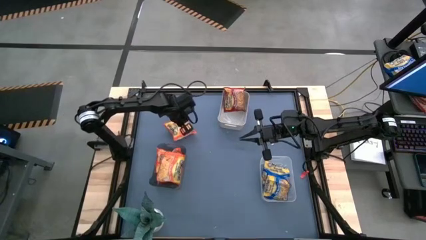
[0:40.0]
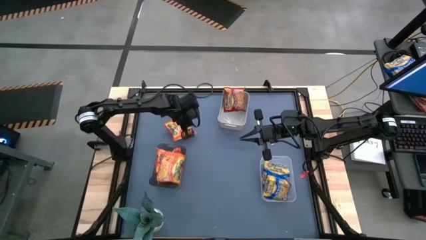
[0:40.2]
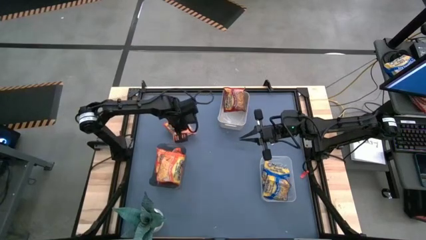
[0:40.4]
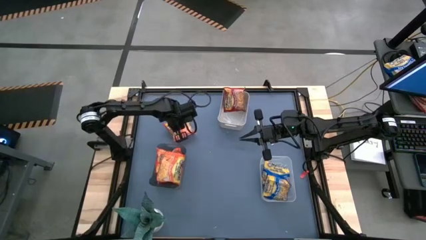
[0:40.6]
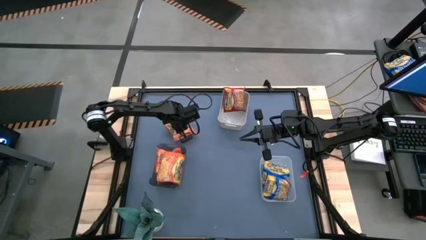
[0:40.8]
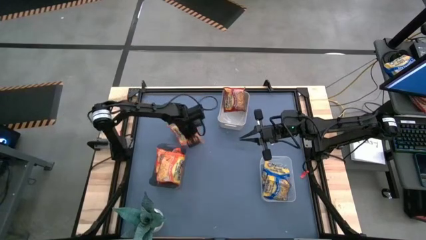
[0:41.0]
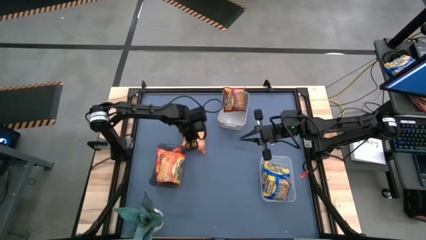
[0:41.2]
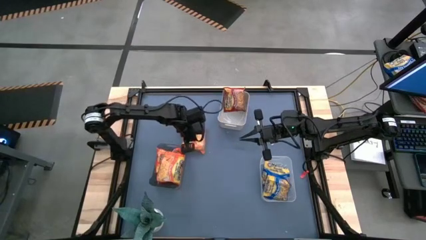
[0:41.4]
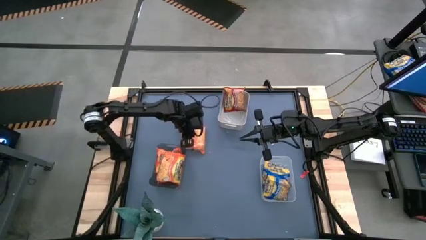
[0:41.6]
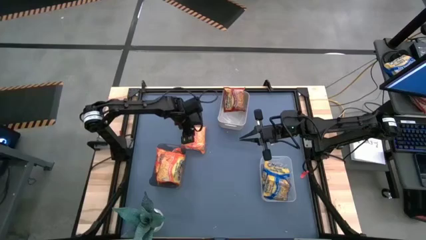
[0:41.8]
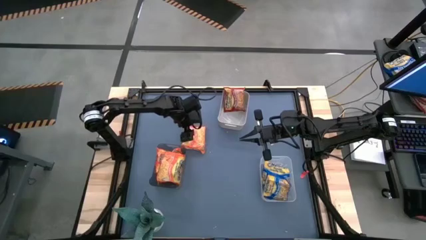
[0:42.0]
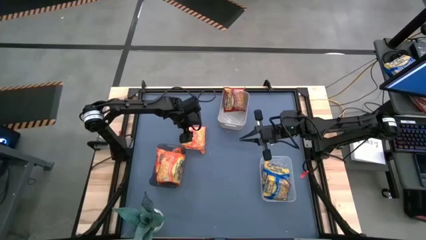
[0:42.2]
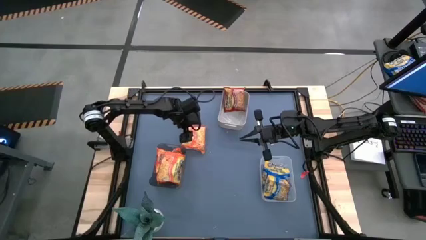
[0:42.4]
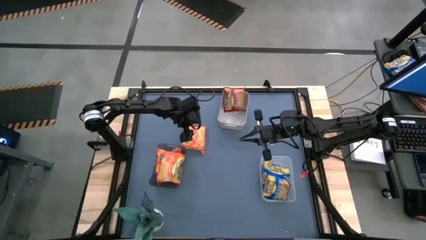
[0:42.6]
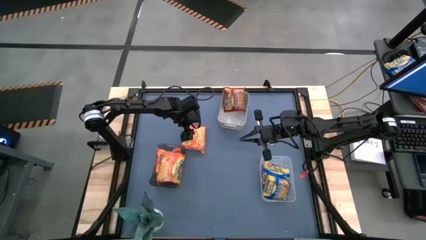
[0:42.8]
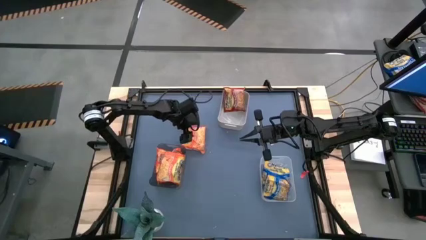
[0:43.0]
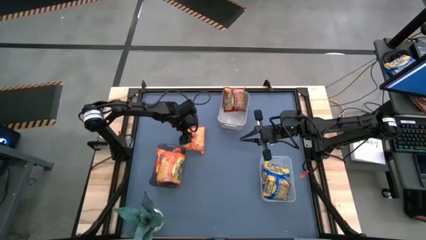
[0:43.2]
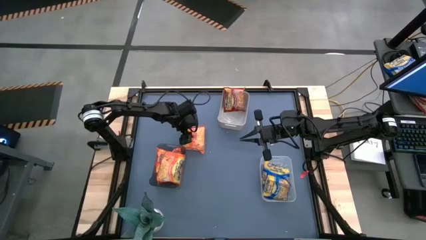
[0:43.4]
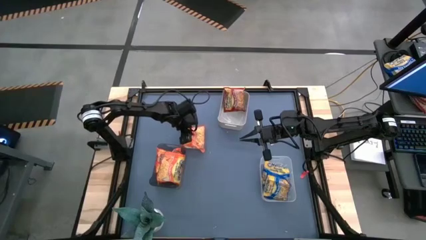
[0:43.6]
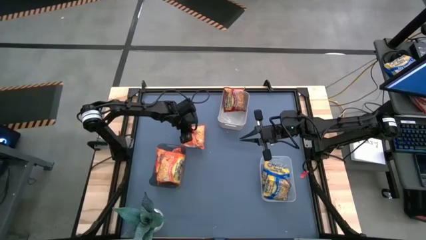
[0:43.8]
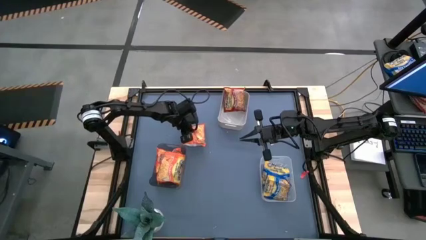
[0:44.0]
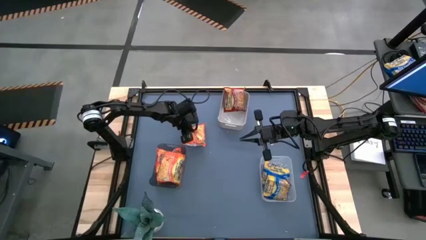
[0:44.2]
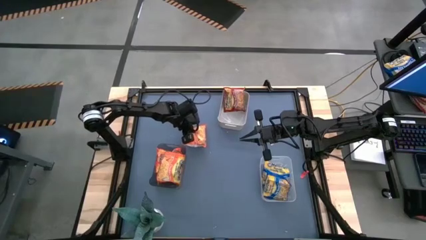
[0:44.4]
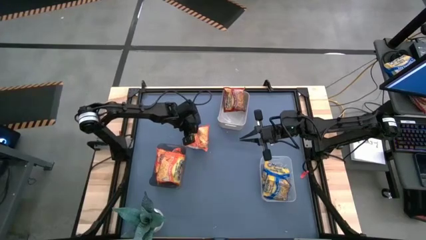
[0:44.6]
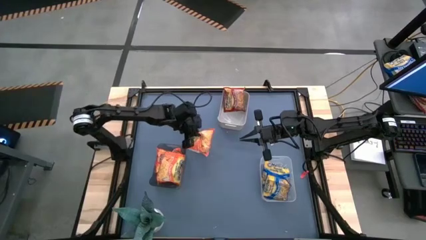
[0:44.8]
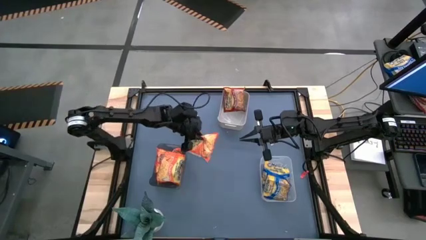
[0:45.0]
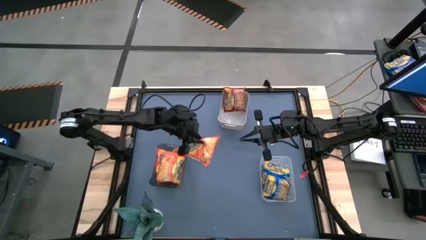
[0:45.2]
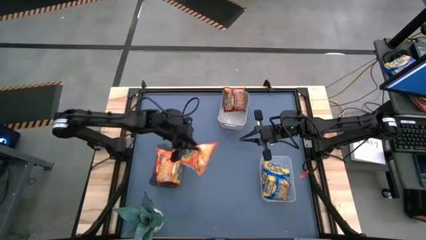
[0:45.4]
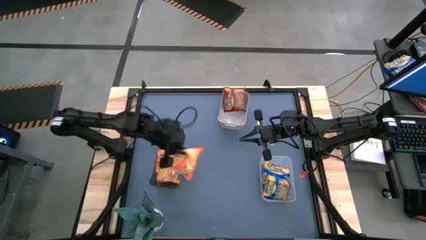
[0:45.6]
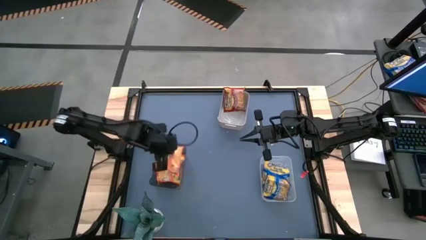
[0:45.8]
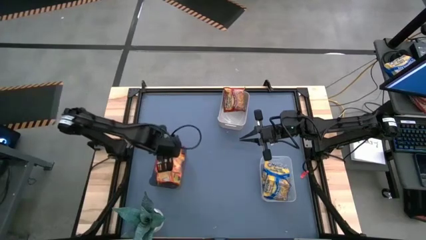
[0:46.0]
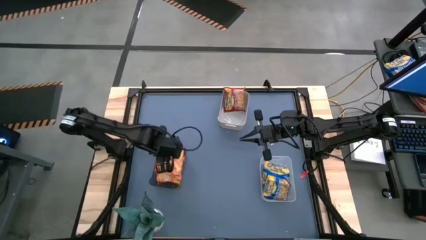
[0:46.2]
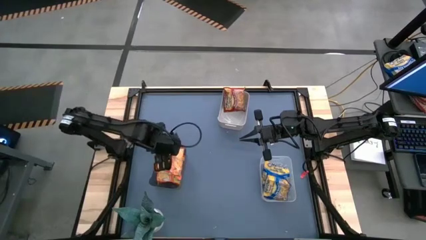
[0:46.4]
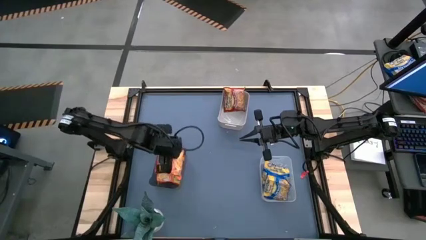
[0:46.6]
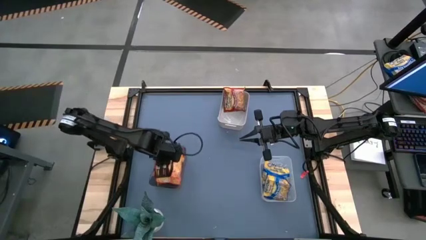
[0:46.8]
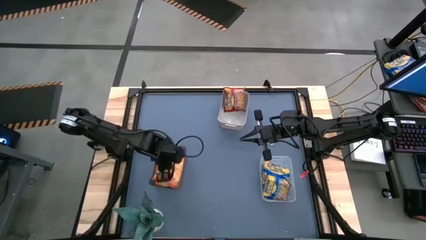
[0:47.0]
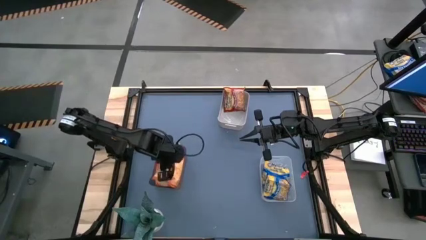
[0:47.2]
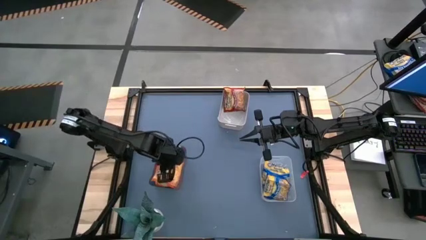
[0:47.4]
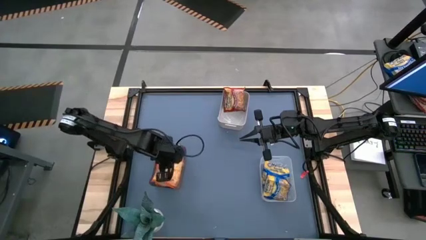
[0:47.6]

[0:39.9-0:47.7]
Task: Sort Maruchan noodles
Put the orange noodle pack into the black bin

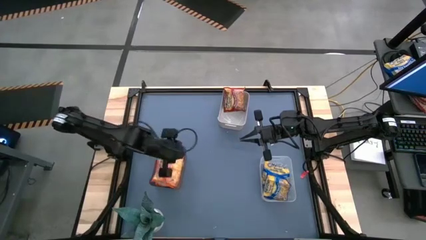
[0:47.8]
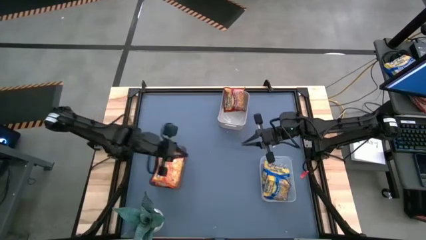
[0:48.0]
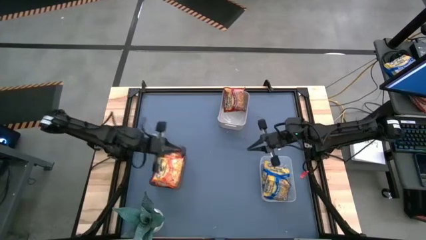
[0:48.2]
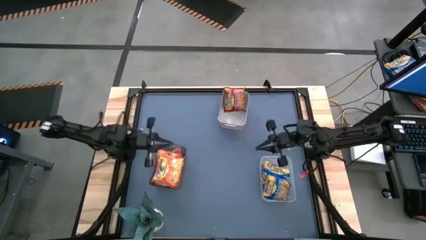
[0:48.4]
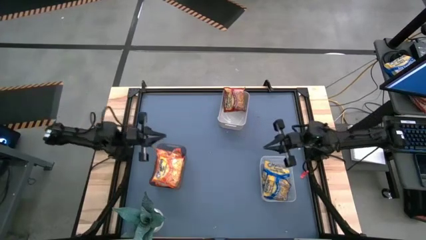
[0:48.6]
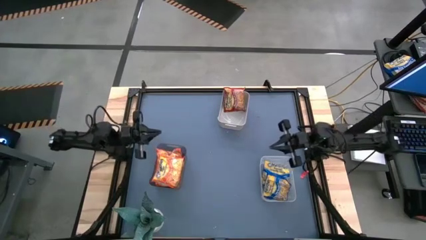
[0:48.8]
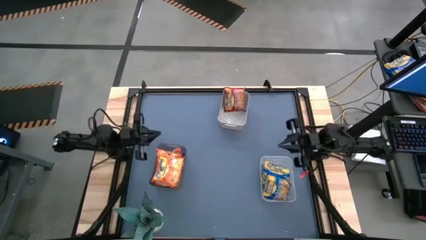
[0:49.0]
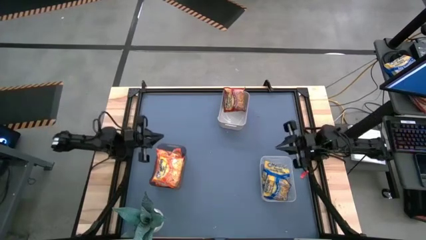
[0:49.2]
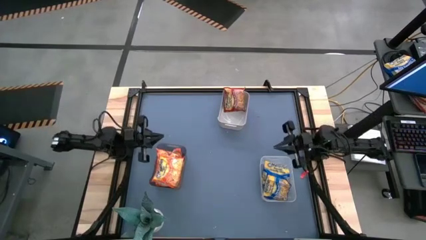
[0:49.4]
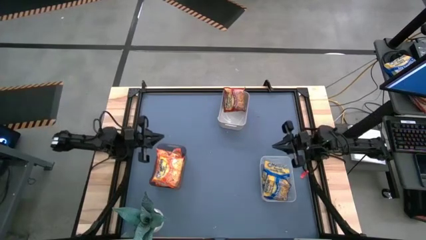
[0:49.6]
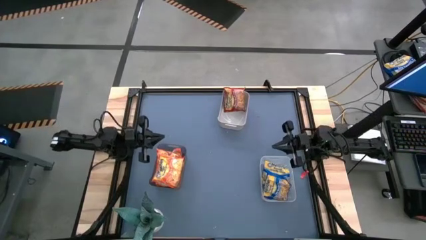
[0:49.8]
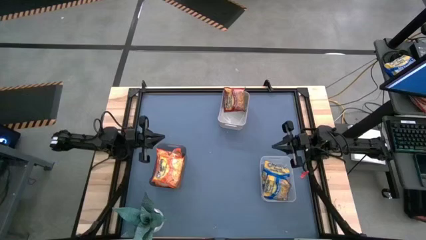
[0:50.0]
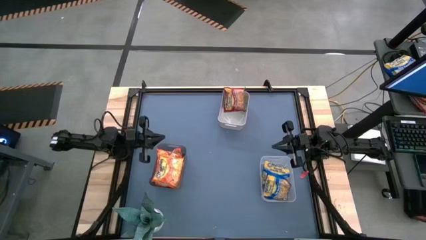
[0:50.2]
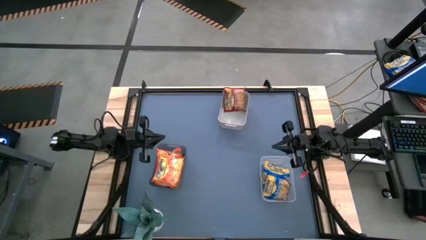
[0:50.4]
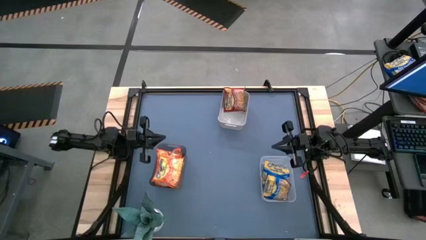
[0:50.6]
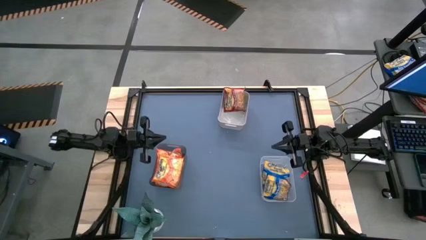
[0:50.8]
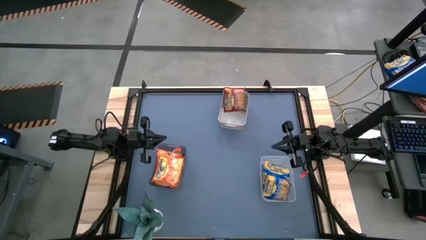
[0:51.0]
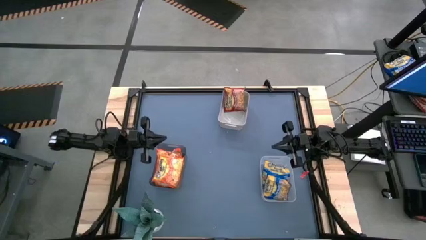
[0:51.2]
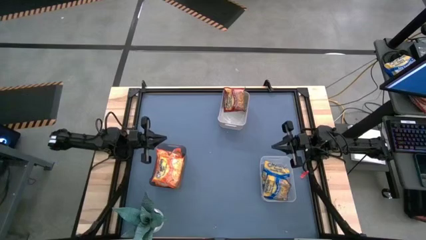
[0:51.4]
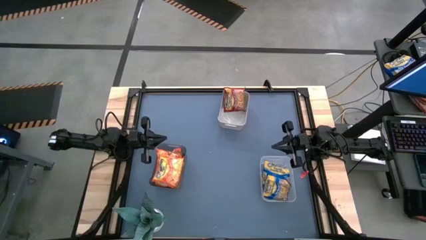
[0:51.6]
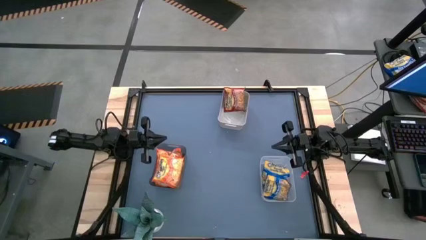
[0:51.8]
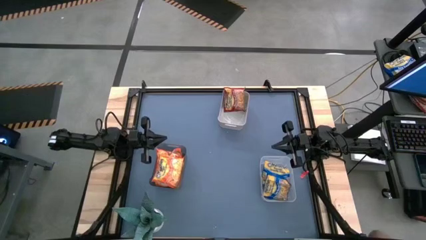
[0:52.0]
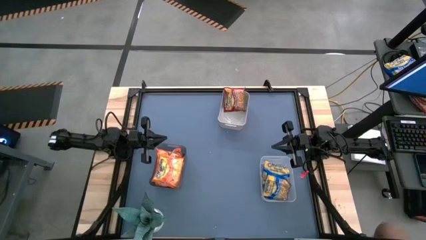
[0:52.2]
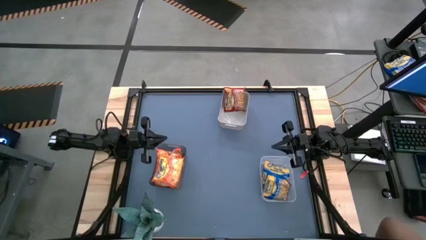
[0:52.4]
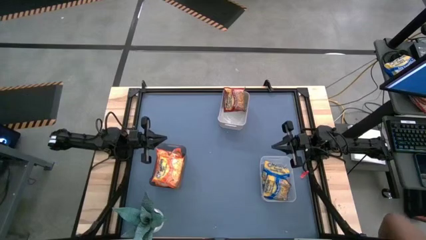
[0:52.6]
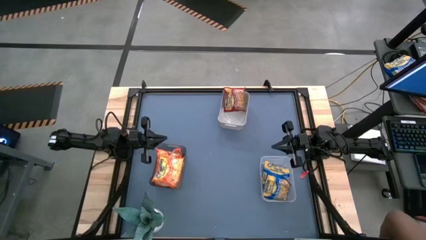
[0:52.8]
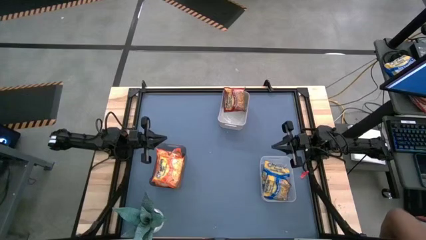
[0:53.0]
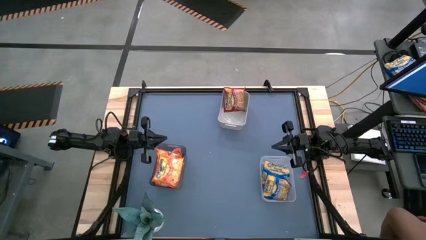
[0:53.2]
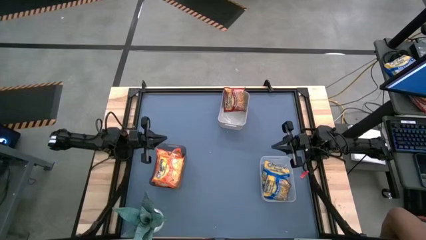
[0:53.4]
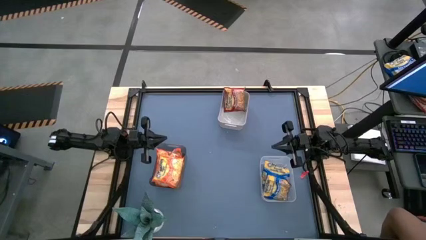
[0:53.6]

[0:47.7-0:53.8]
Return to Home Position

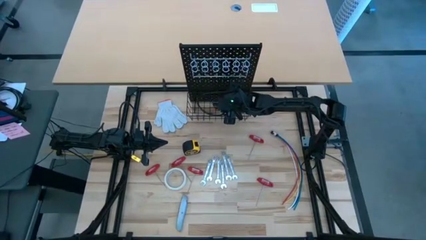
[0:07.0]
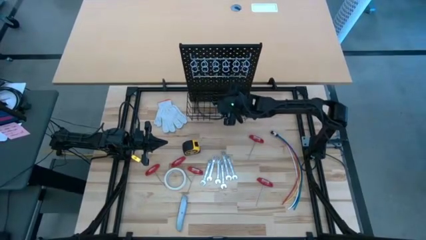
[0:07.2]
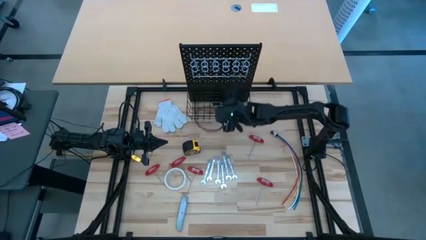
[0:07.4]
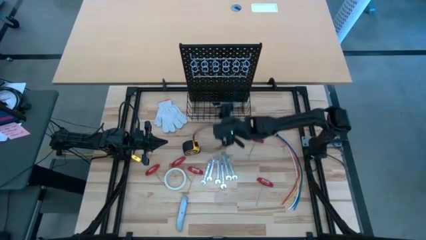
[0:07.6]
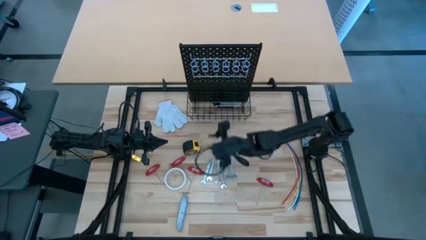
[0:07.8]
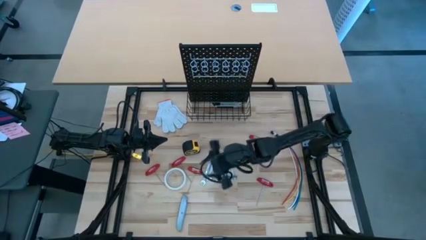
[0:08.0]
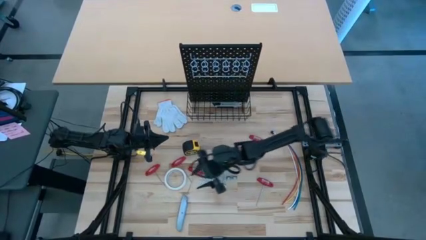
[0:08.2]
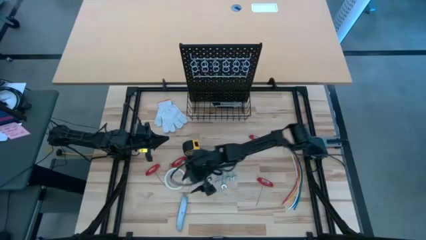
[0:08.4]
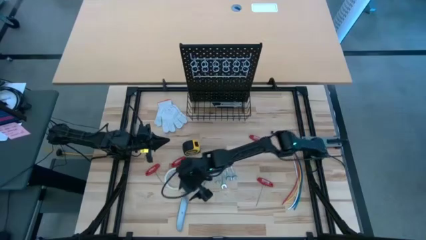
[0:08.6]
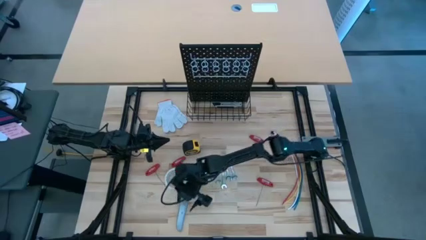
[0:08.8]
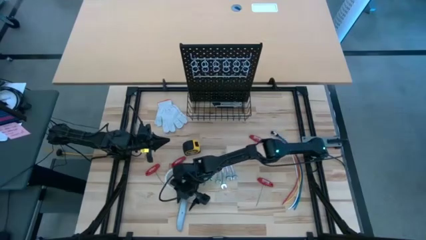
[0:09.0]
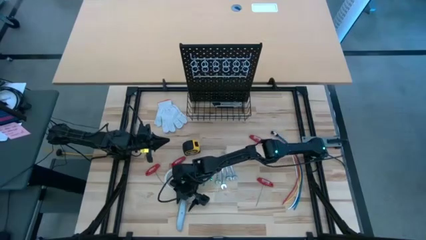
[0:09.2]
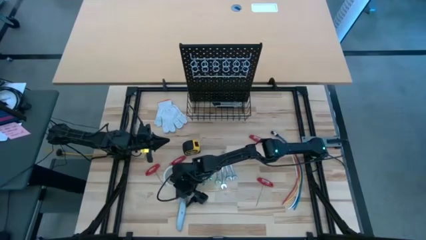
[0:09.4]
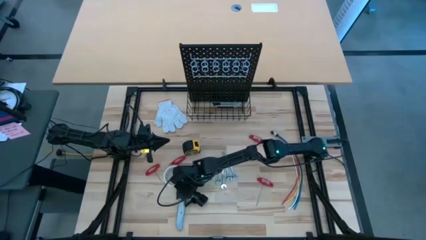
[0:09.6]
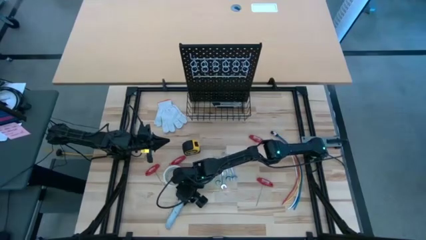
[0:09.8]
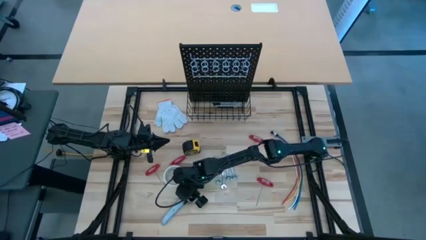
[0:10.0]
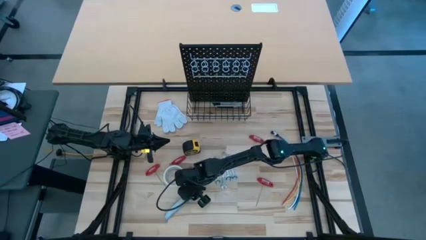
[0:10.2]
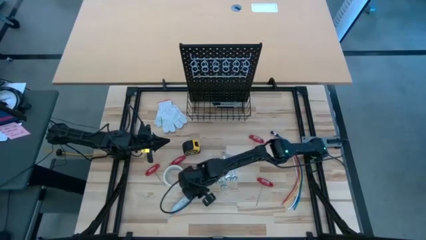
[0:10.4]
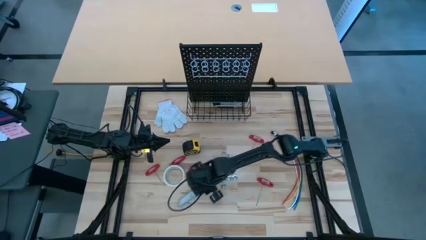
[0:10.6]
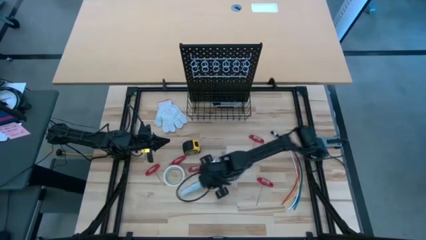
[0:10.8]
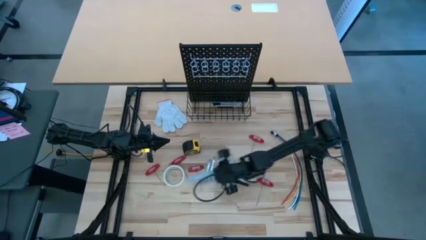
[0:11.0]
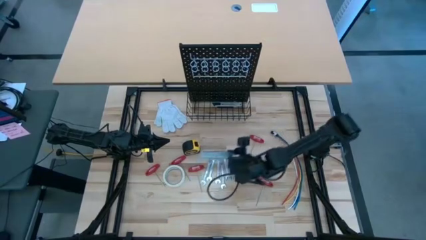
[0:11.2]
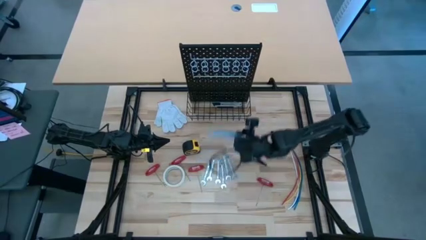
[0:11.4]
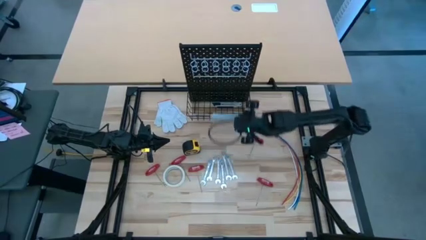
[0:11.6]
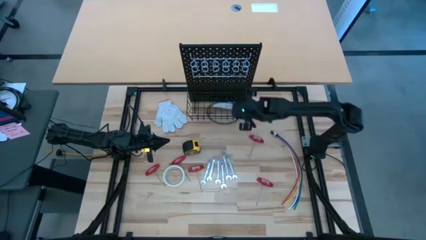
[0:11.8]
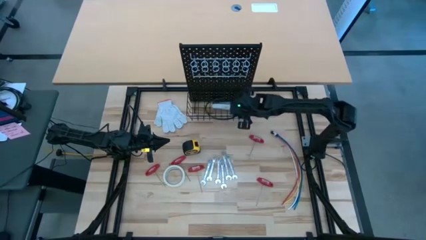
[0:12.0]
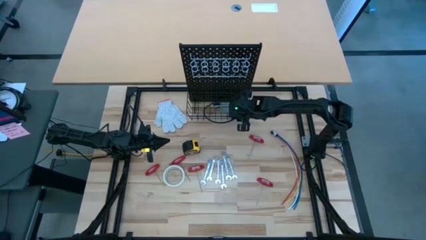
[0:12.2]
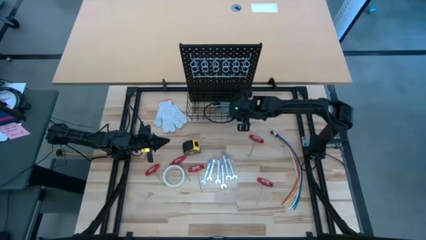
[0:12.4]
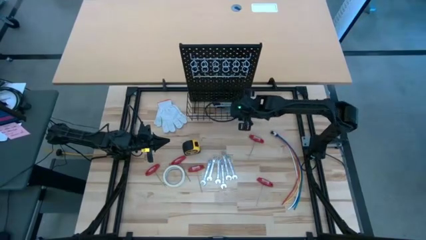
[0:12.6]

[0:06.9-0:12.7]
Task: Hang tools onto peg board
Put the gray cutter into the wire basket on the pegboard
